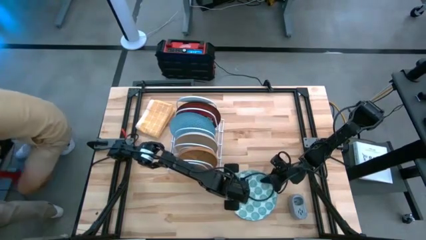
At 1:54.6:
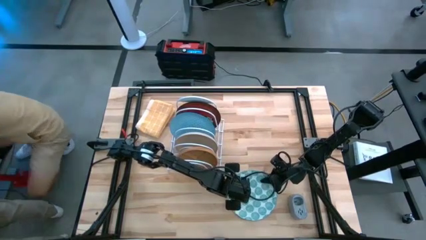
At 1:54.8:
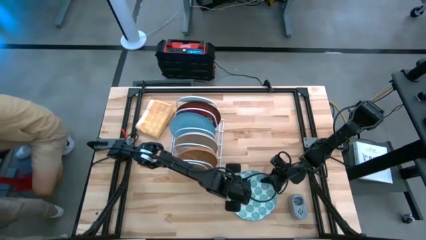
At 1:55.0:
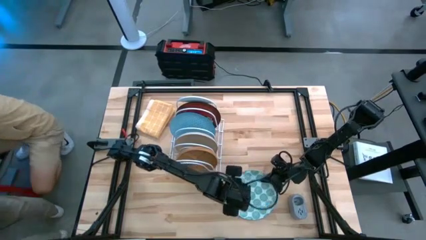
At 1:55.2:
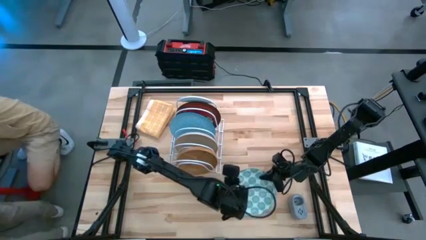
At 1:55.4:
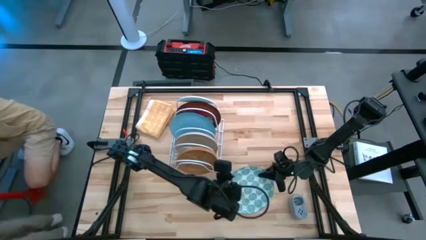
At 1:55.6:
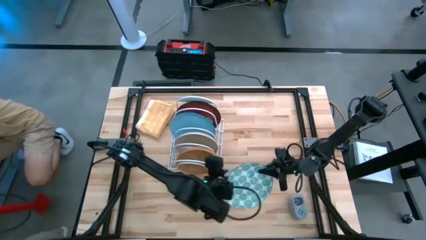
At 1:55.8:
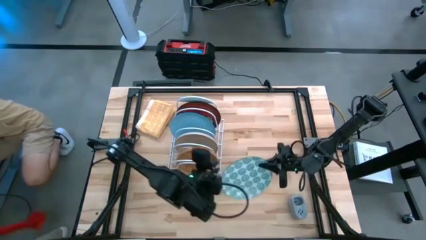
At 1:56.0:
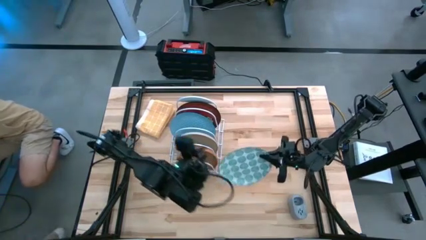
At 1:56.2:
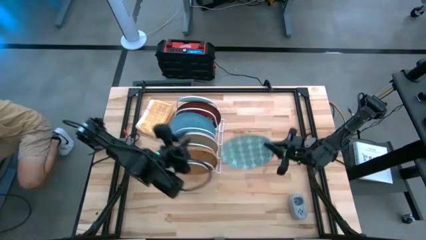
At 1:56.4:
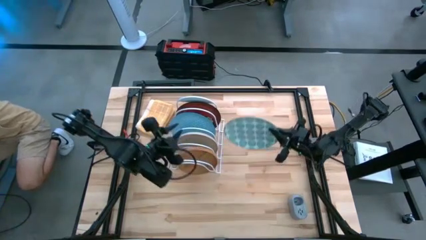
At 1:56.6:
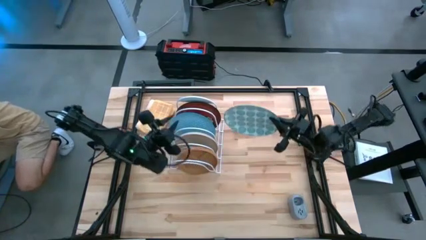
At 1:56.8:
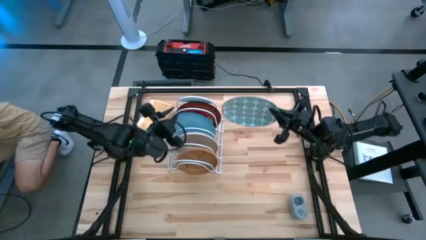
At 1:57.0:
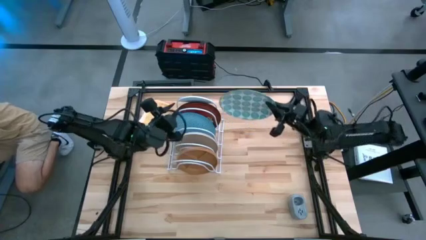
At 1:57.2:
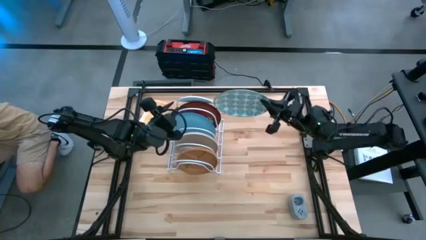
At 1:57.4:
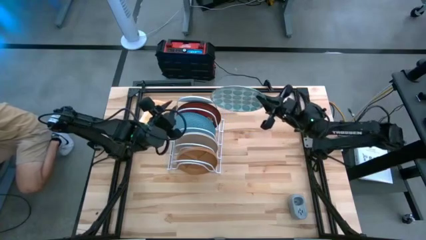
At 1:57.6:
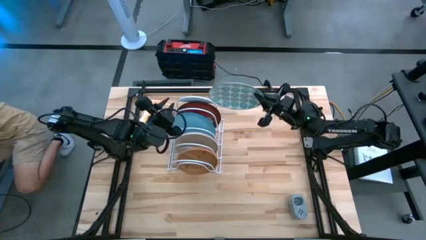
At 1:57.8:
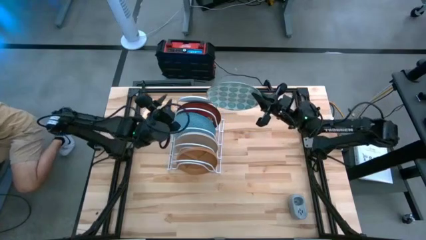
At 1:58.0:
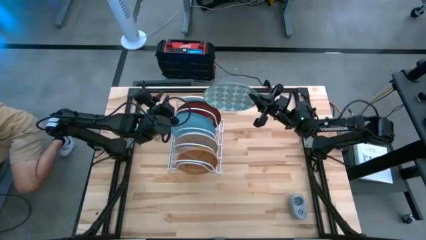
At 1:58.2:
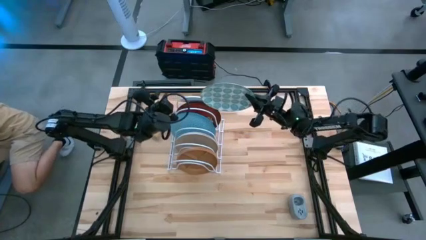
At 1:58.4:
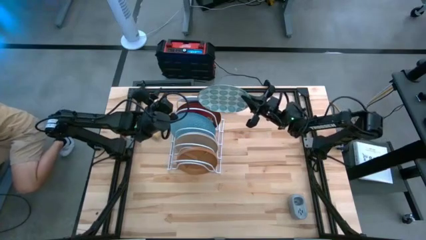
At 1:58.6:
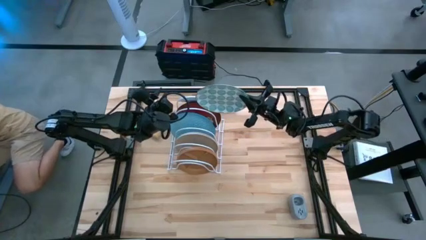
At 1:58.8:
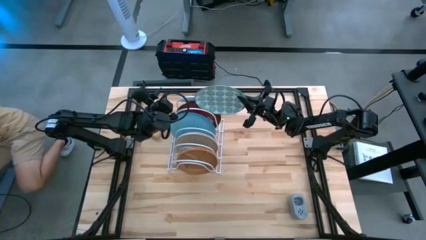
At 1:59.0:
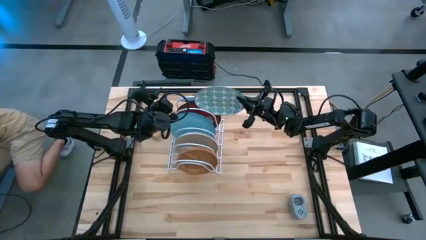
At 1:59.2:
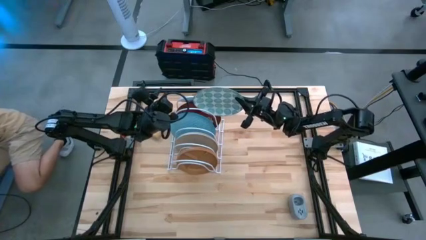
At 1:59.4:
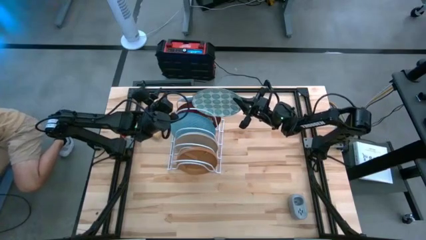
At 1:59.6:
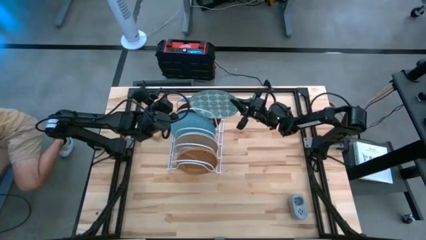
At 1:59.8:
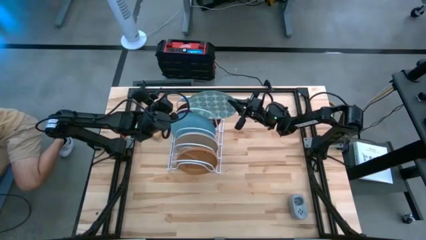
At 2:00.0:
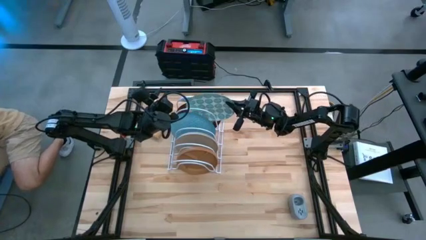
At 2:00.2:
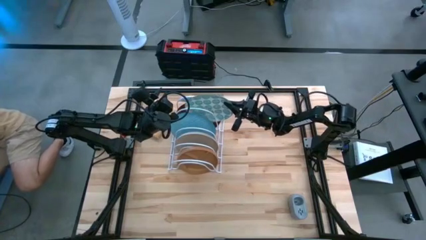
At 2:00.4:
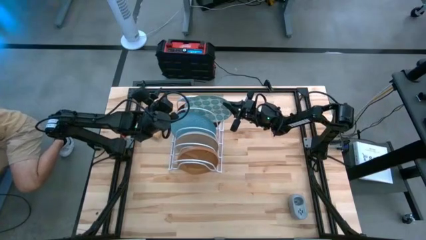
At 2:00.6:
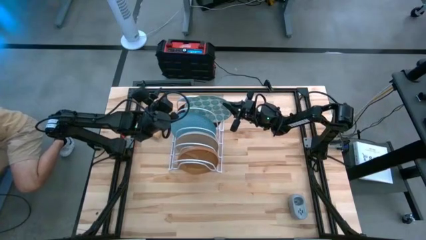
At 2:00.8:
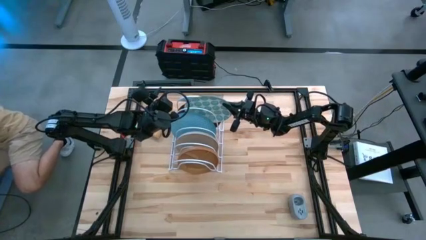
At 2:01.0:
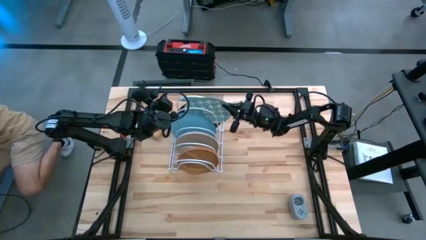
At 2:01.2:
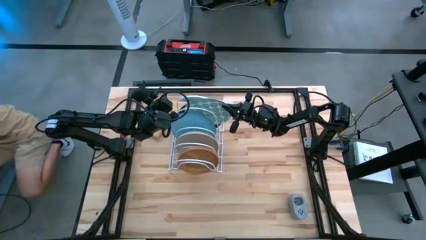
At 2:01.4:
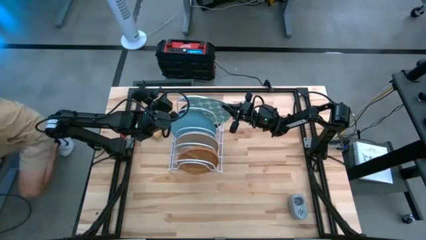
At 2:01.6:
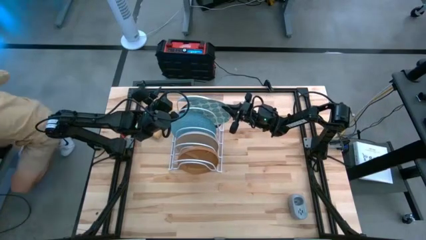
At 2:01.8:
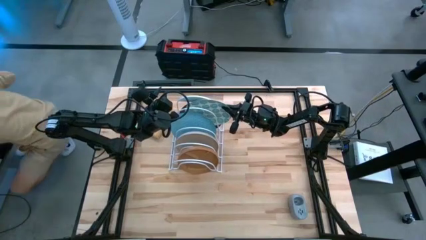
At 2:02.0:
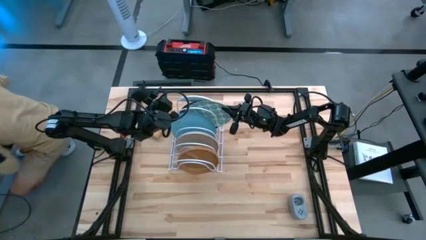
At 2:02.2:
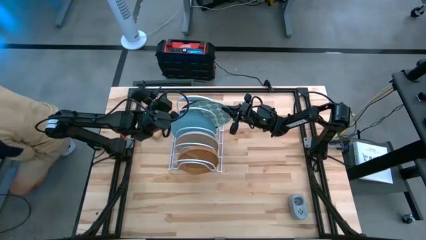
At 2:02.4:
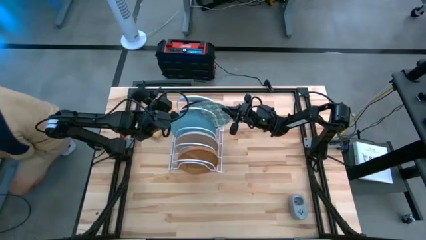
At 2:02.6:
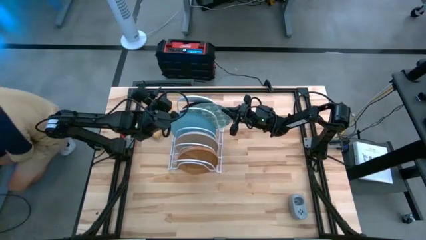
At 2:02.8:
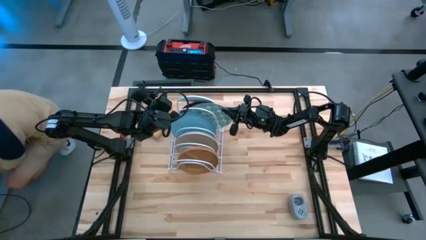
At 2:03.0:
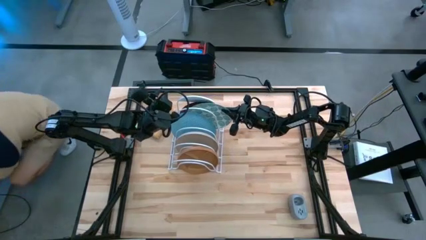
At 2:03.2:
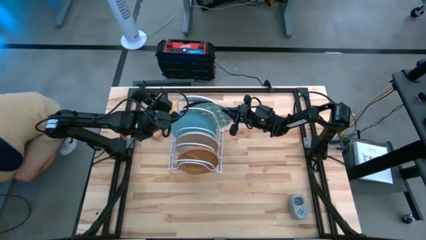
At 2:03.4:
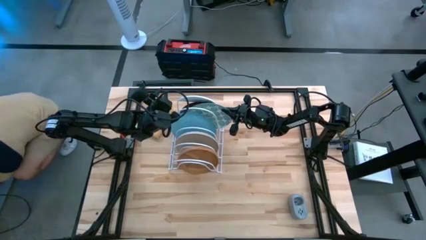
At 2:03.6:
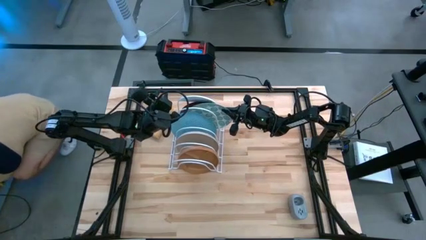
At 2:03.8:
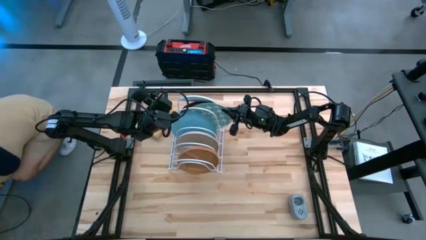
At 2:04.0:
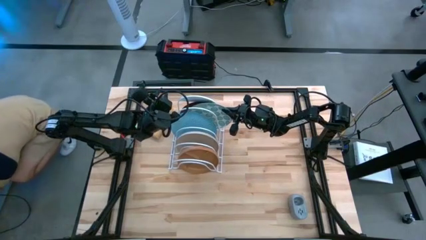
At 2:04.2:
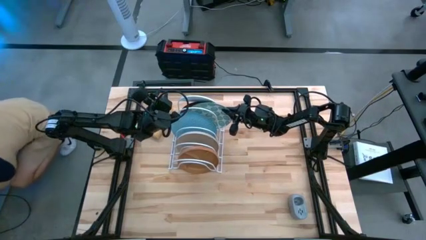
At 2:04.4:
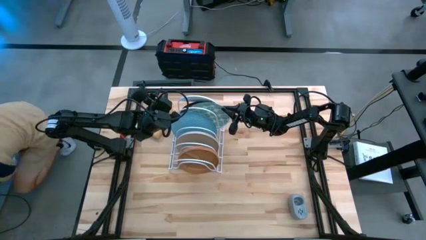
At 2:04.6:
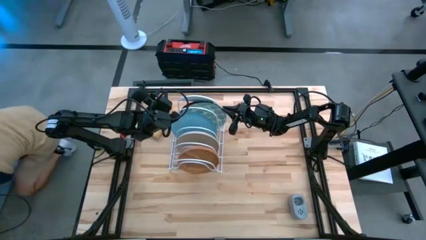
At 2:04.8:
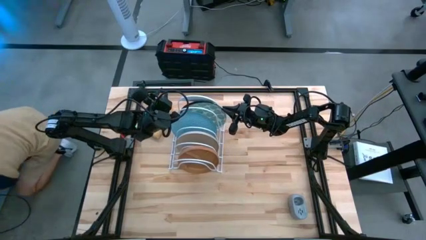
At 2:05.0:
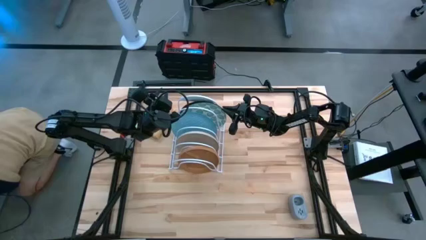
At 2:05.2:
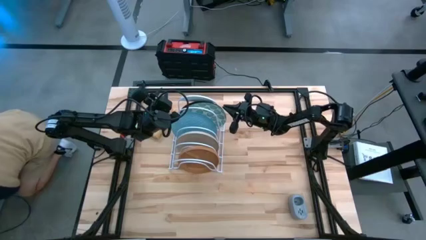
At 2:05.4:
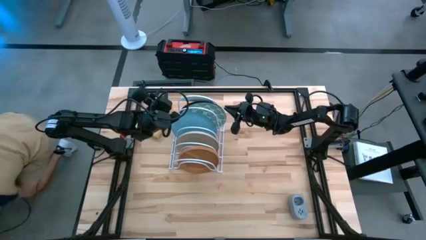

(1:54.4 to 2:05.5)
Task: Sort dishes
Put the green plate into the dishwasher rack

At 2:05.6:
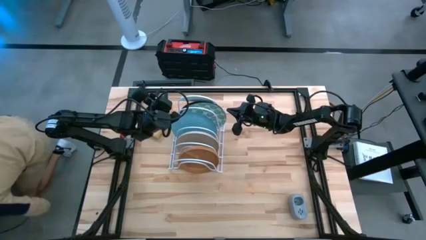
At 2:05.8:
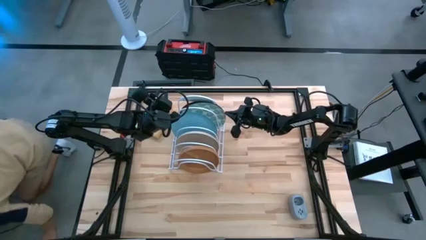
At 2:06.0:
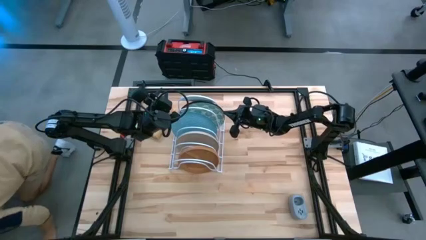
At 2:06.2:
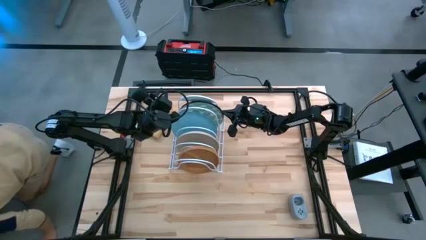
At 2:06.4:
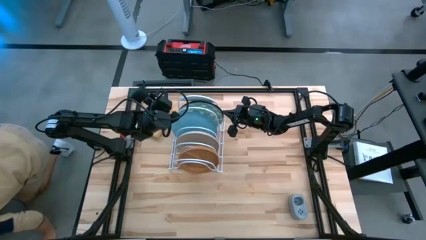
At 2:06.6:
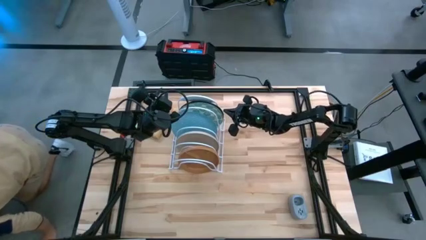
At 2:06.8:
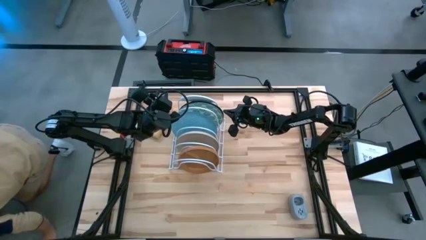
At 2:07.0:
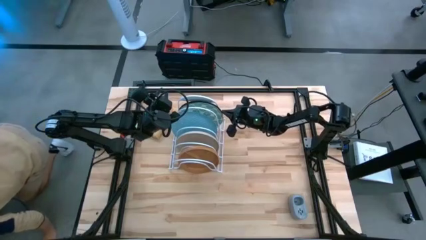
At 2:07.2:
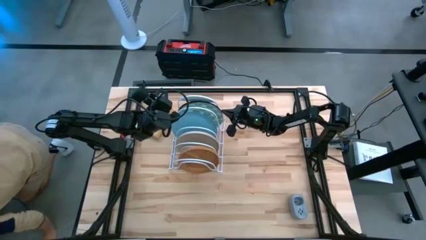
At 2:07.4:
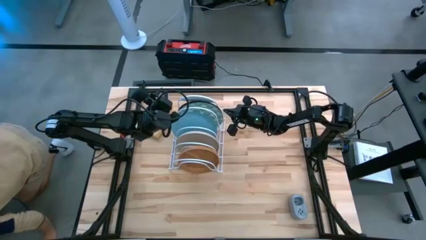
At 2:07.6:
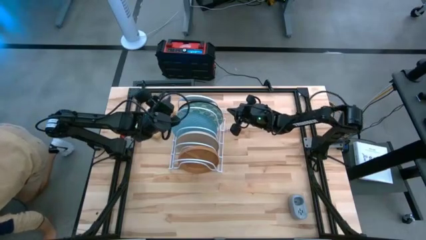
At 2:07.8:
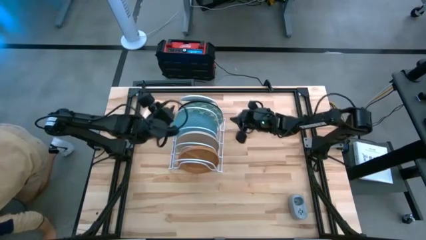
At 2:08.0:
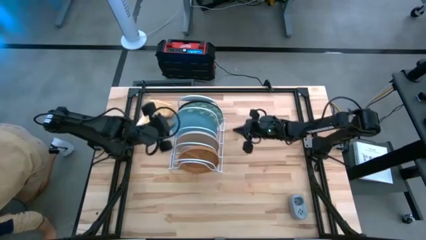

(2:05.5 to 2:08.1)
Adjust the plates in the dishwasher rack

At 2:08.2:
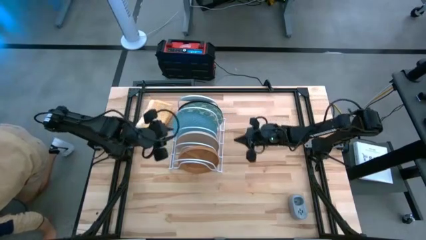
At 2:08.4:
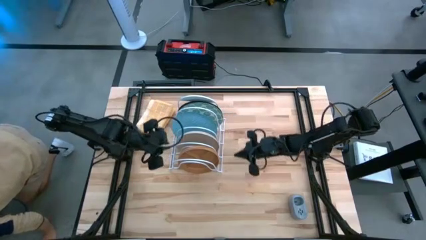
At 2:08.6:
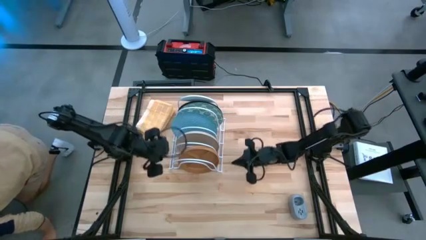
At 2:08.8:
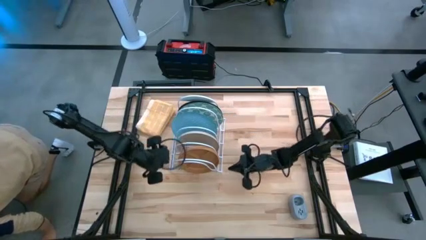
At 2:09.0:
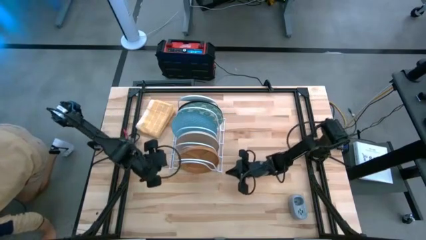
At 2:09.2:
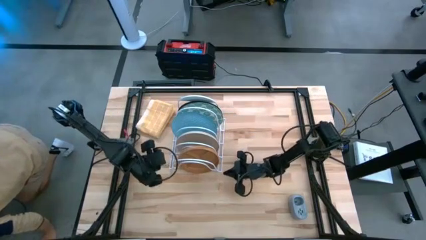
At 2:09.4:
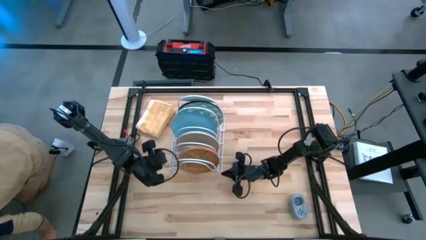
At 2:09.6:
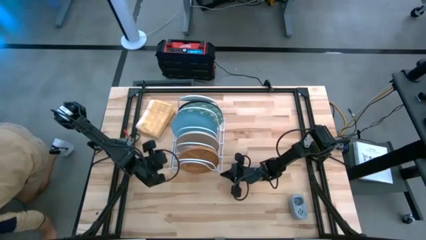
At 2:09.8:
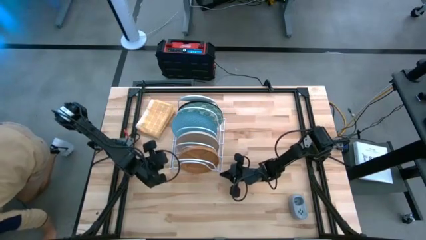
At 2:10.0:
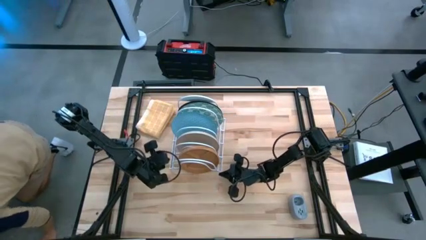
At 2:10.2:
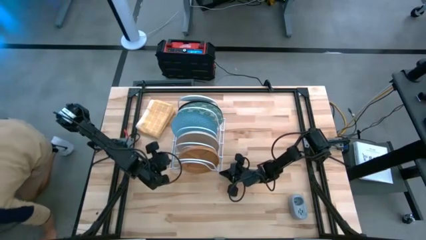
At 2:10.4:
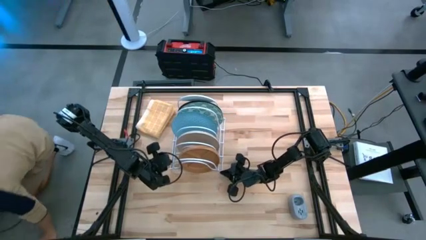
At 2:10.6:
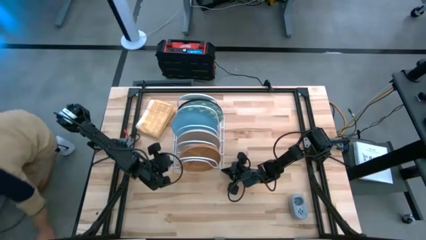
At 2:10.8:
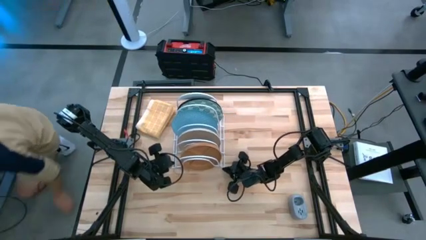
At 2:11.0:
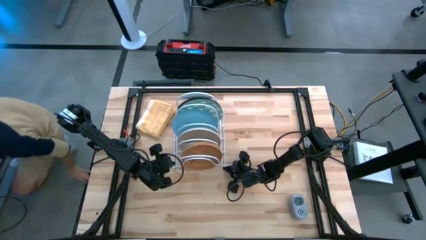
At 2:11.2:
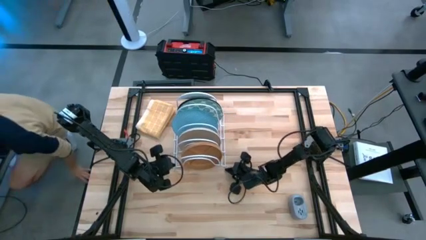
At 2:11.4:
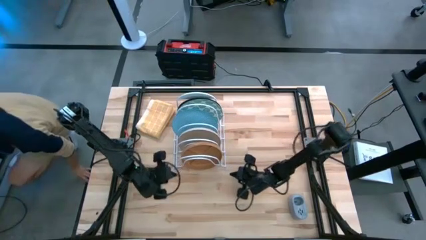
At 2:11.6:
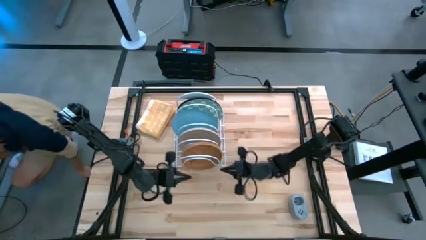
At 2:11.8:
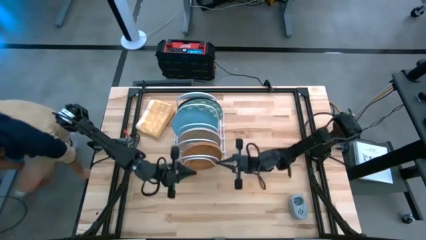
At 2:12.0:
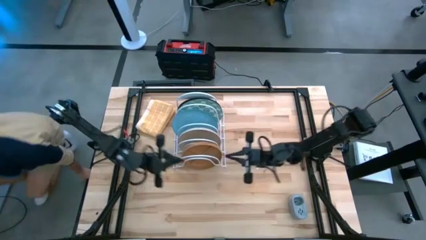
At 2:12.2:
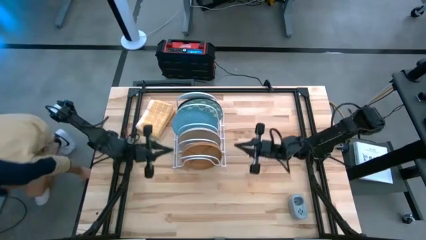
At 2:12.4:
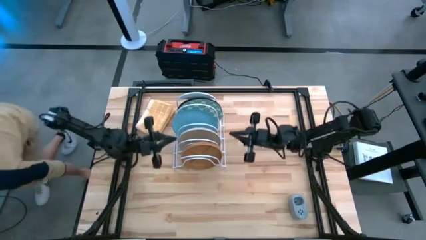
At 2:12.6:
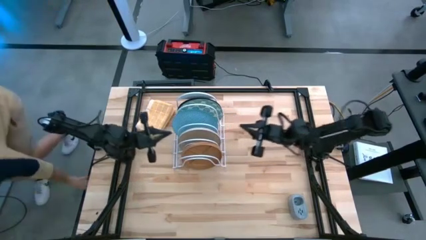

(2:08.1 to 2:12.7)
Adjust the dishwasher rack
